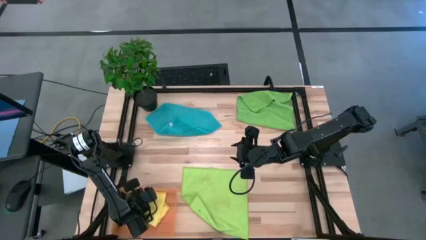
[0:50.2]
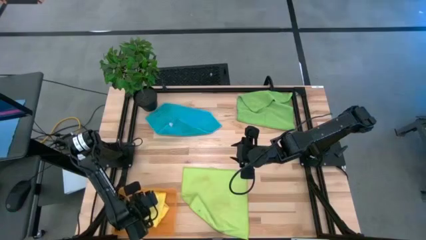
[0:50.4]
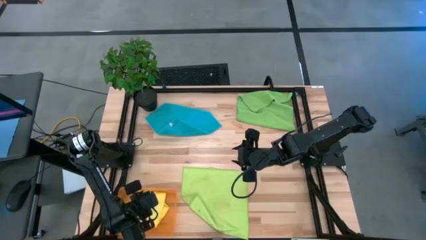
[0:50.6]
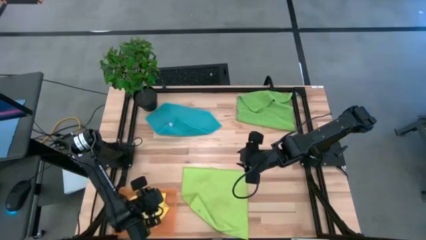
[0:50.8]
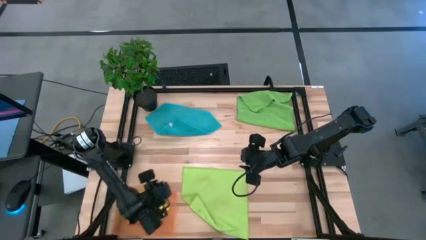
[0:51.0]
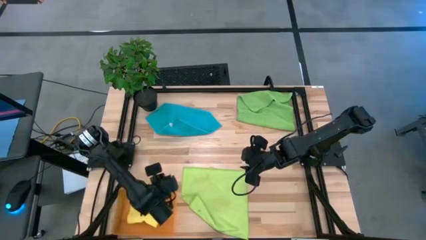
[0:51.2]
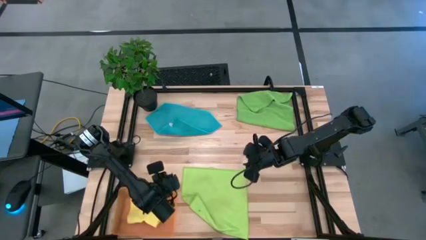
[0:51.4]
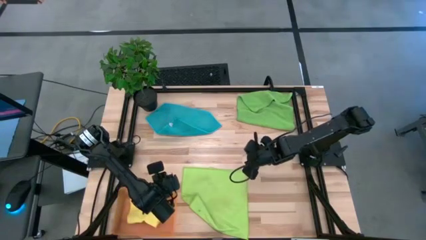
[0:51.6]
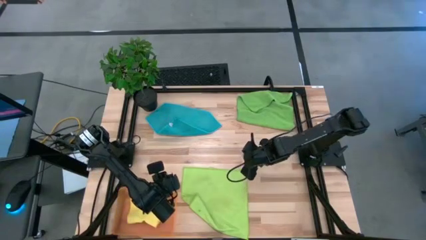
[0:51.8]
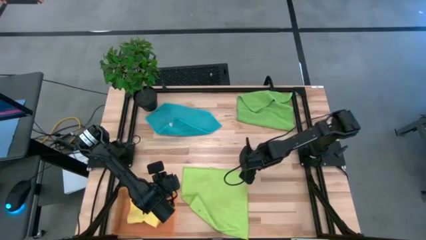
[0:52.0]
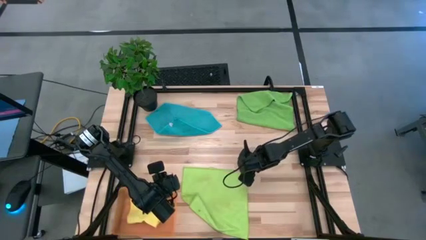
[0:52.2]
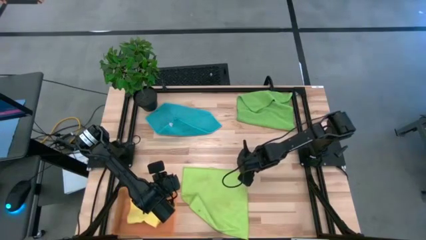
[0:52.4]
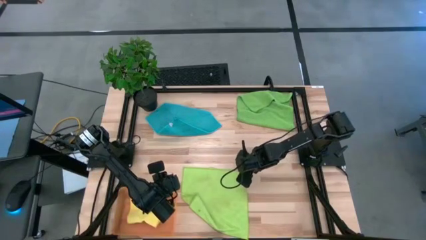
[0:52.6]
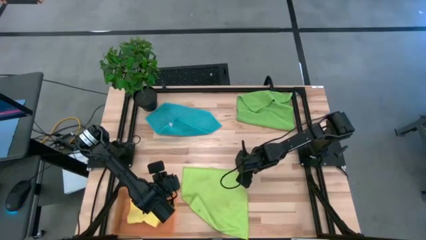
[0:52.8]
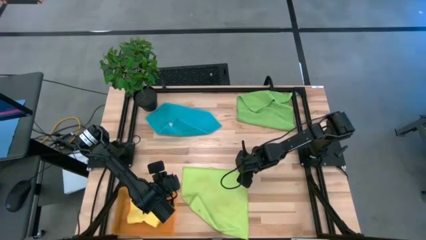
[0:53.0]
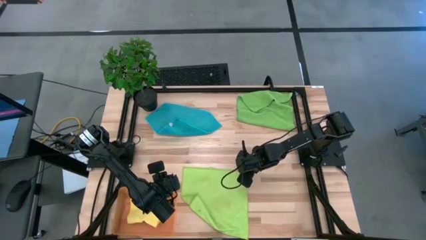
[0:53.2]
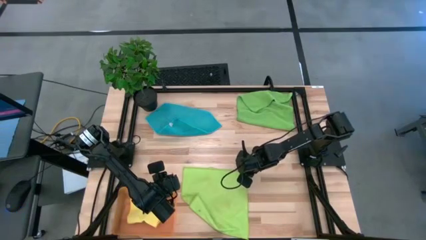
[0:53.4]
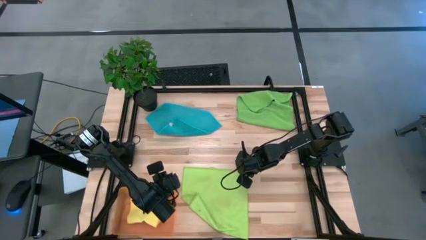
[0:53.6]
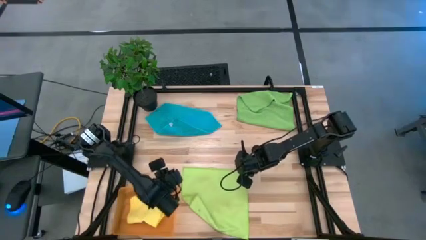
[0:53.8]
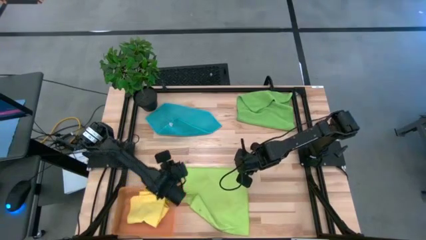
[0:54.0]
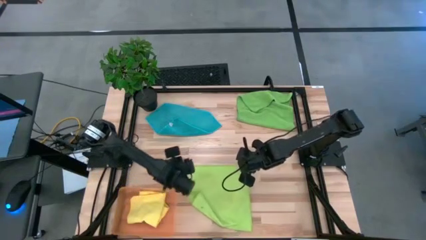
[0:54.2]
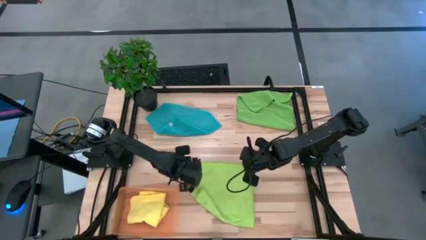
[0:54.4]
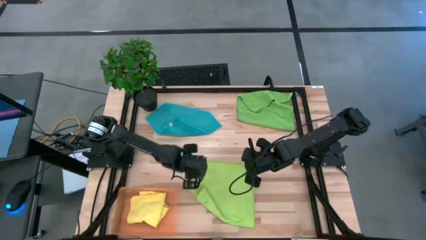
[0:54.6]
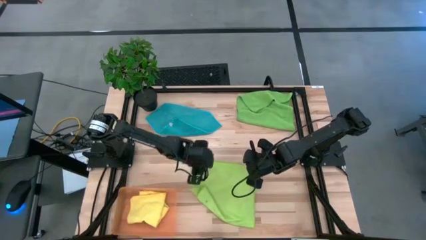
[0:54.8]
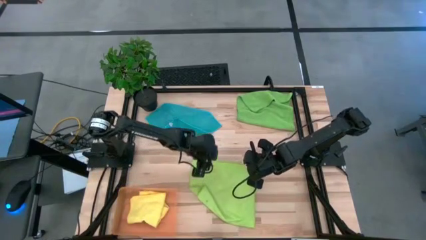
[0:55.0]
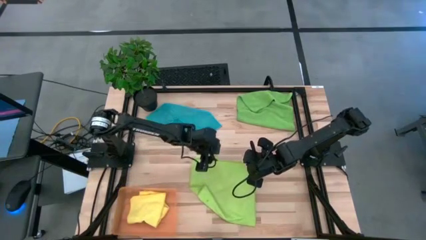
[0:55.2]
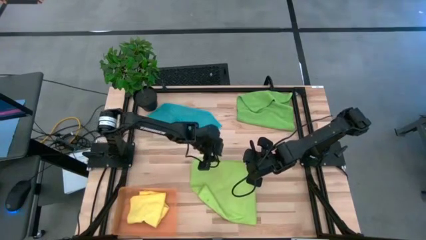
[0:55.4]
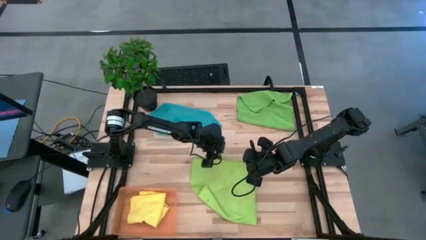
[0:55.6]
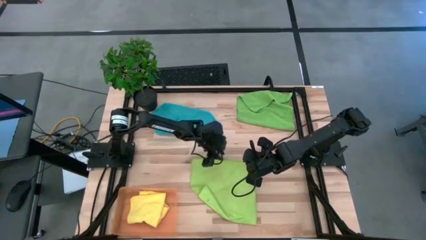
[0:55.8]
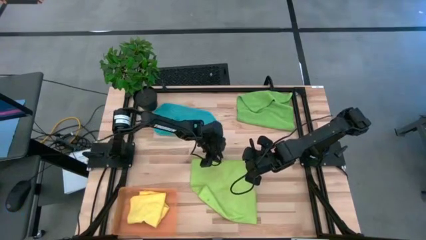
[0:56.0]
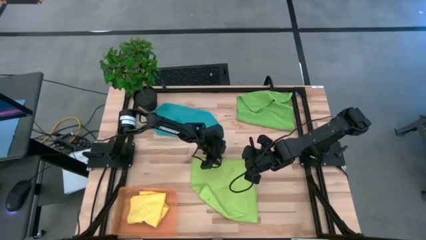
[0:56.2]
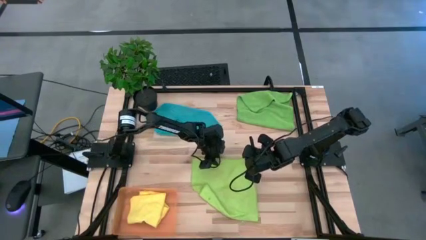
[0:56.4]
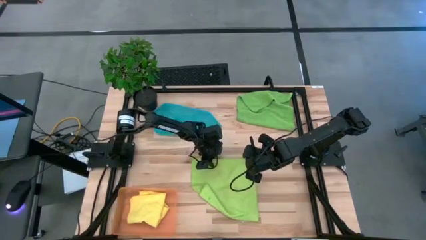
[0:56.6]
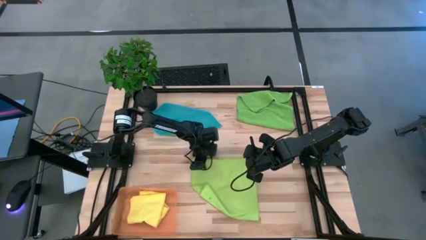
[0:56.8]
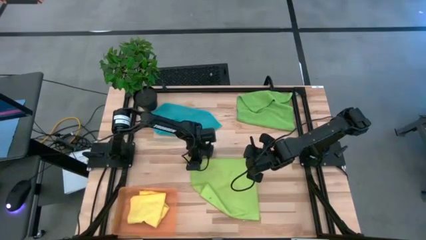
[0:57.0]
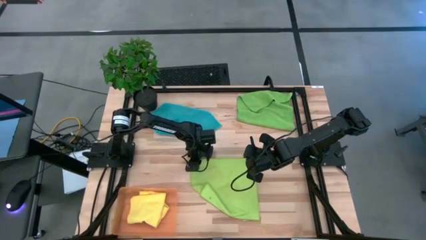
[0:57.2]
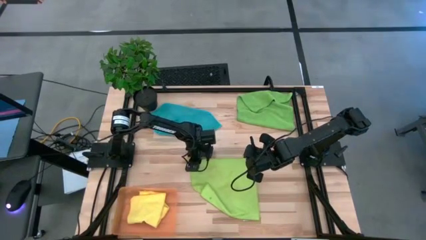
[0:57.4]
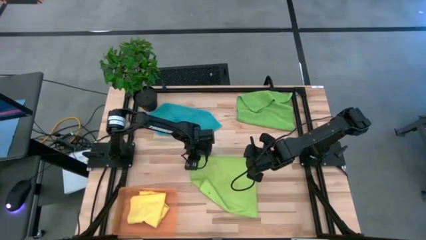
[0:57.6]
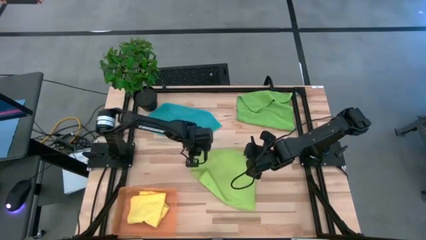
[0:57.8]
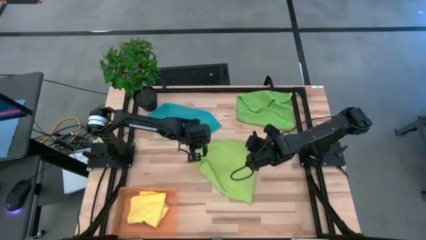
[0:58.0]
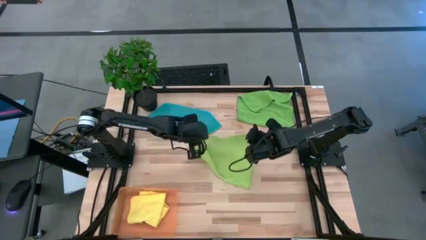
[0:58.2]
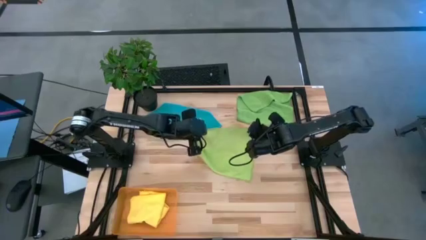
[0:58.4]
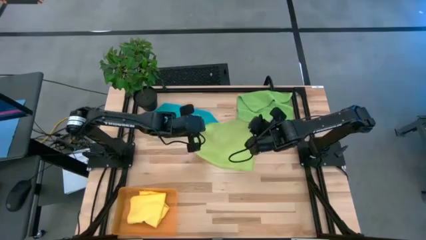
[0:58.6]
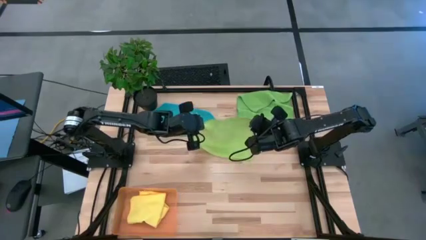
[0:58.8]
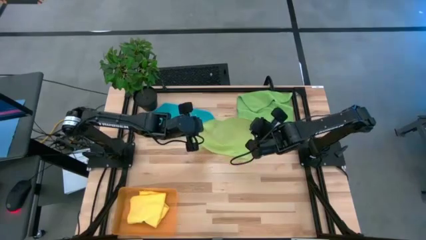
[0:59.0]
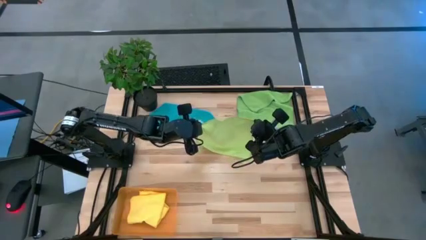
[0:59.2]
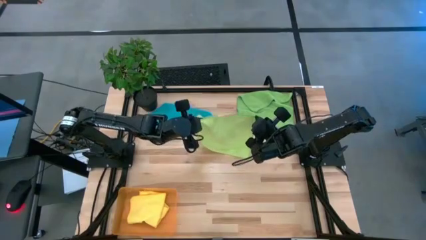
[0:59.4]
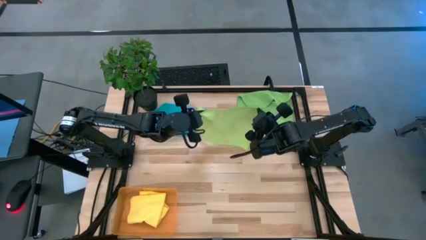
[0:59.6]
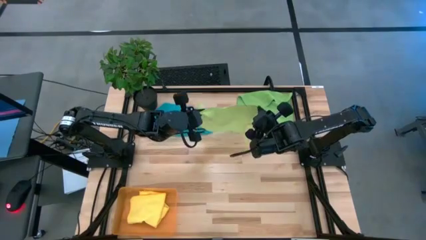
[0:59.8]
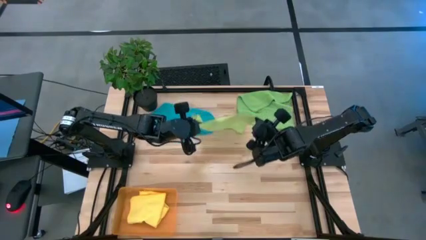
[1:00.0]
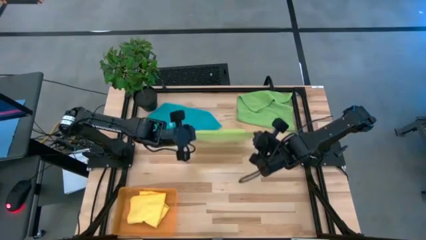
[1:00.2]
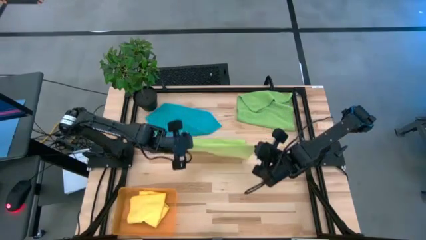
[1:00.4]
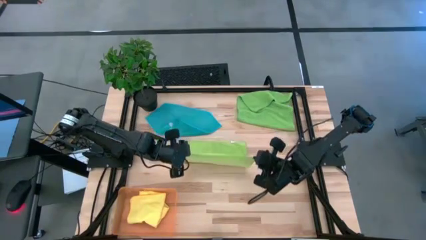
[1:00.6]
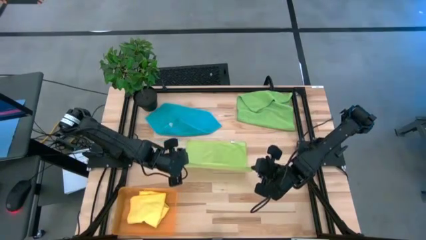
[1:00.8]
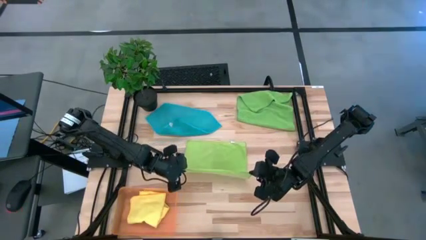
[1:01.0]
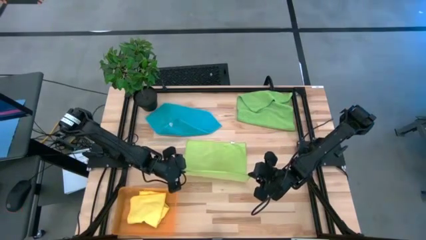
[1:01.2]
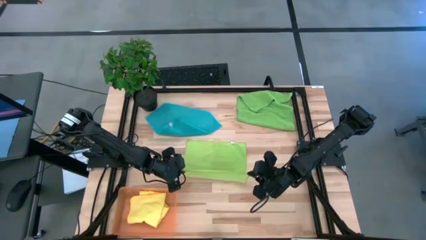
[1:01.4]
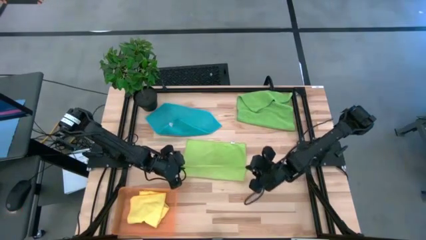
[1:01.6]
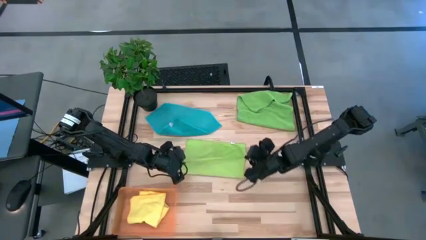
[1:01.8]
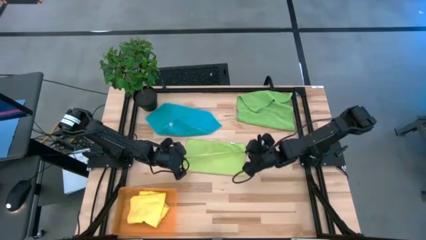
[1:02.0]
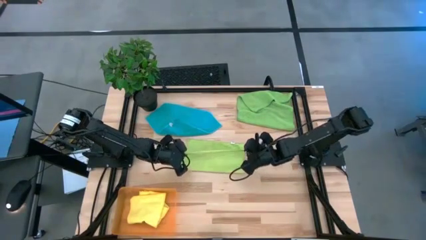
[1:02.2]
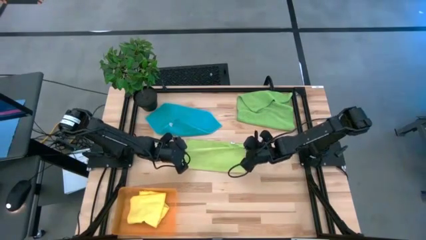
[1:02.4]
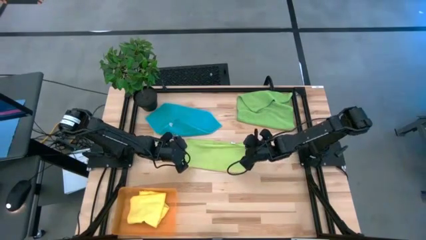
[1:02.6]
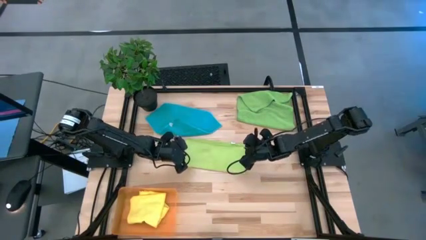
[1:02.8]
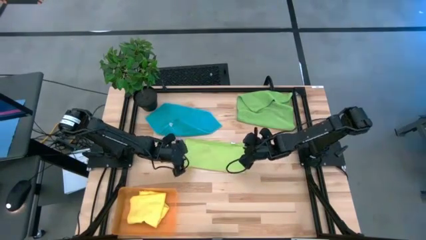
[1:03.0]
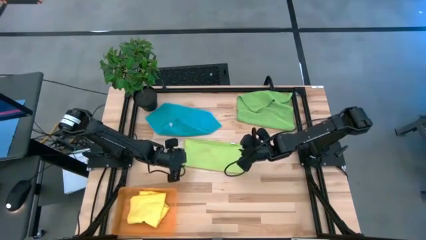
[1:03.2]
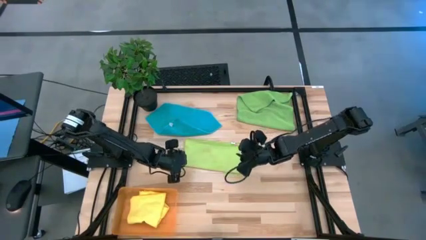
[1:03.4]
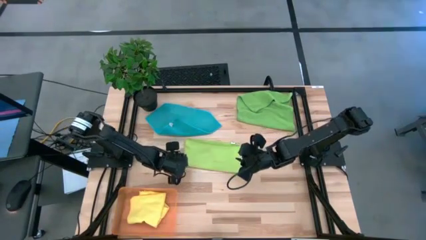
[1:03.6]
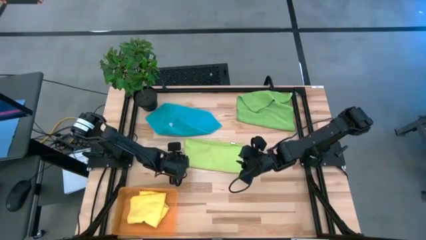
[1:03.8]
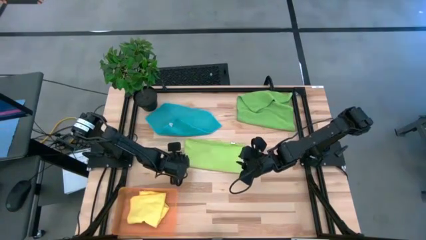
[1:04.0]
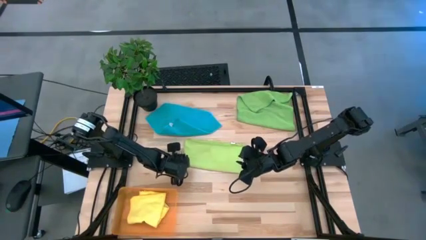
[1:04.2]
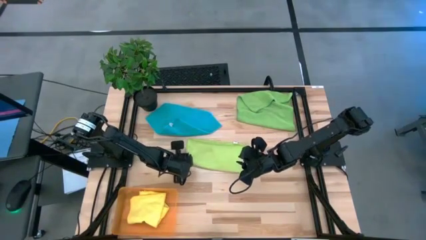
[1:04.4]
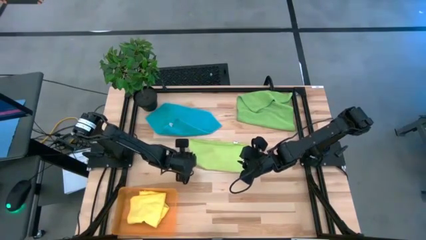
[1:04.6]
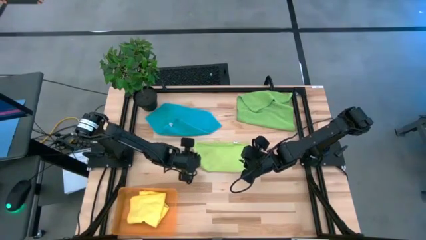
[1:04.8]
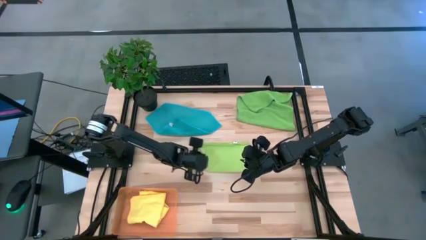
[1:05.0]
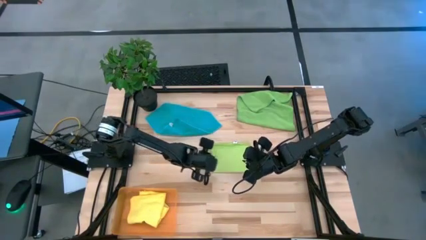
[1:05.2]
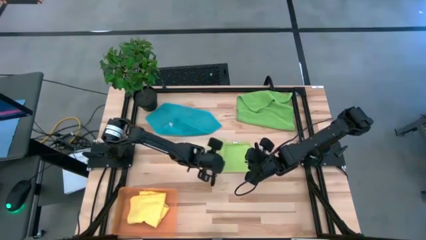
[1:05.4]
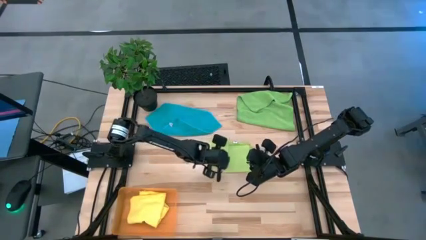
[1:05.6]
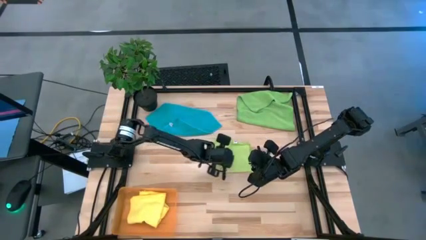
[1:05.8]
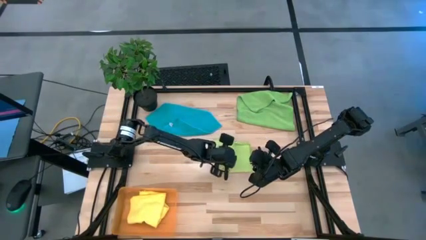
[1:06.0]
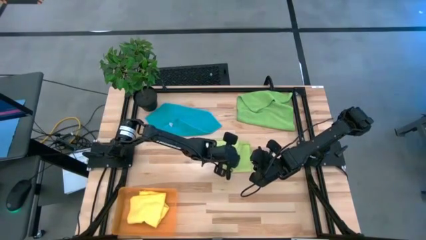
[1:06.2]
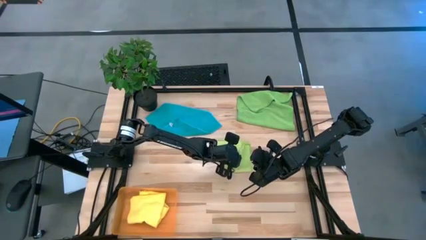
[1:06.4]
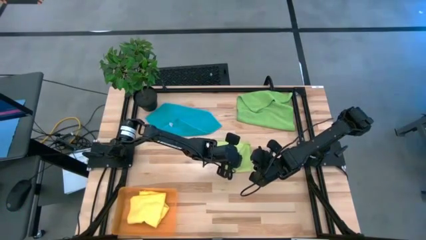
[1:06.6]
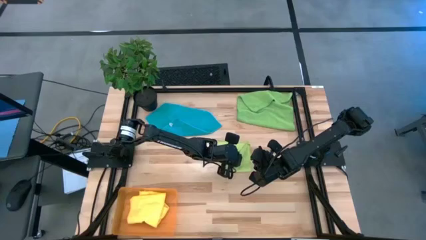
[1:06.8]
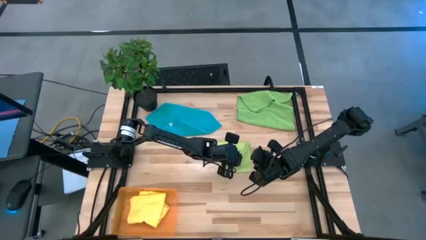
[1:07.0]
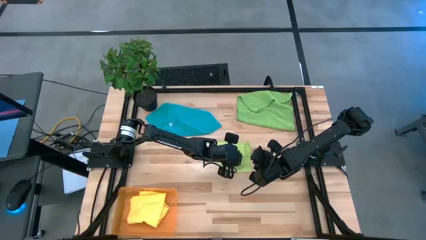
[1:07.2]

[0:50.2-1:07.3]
Task: Fold microfiber towels
Fold the light green towel
